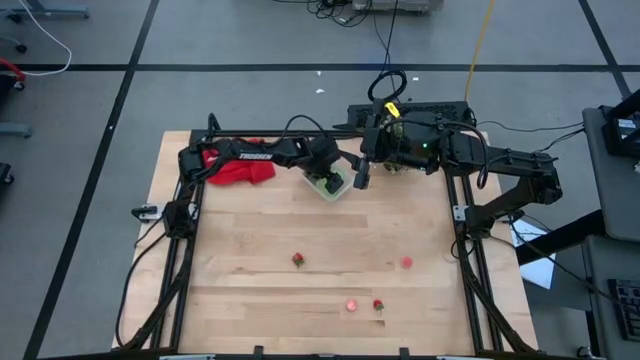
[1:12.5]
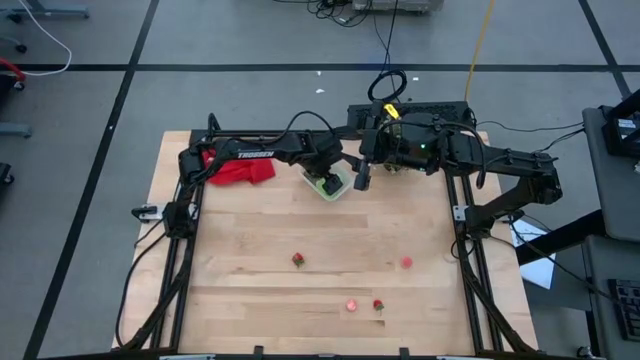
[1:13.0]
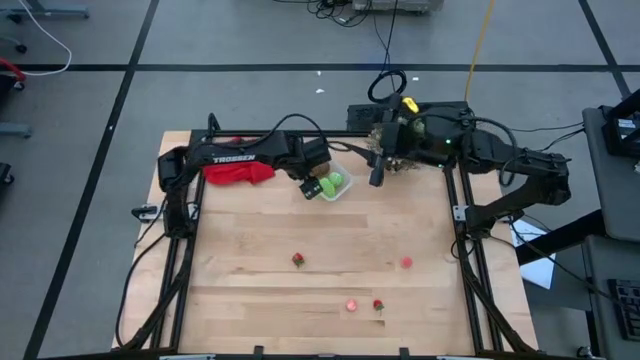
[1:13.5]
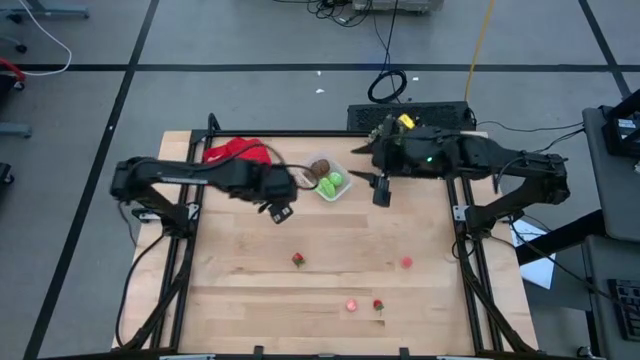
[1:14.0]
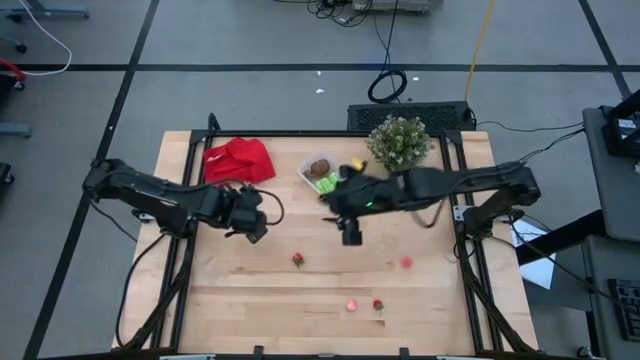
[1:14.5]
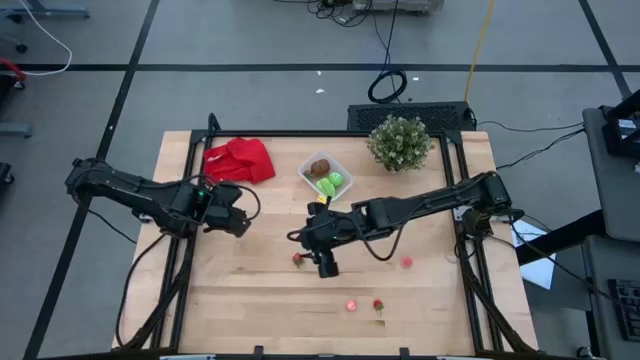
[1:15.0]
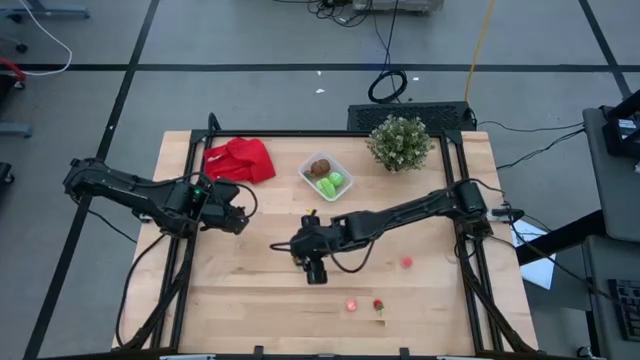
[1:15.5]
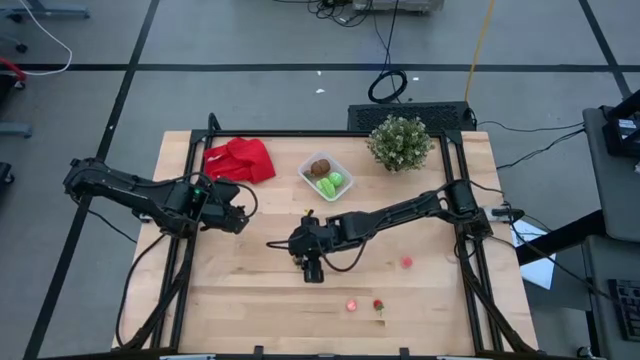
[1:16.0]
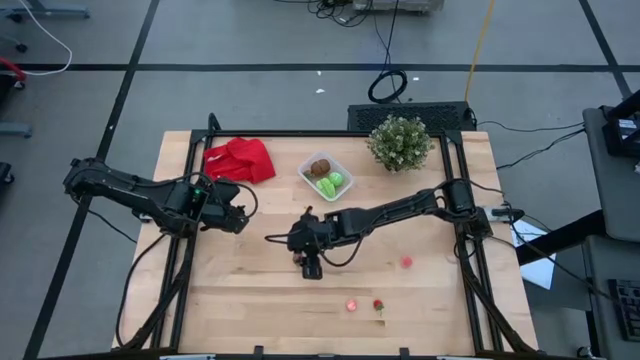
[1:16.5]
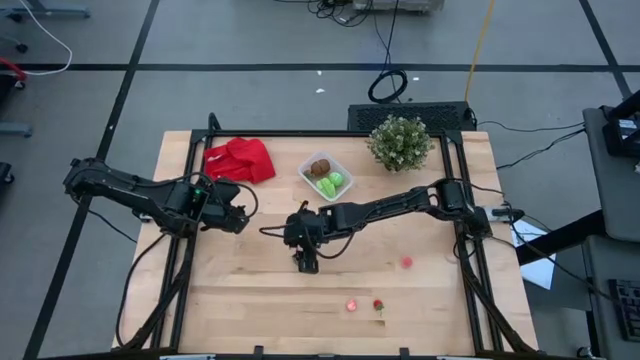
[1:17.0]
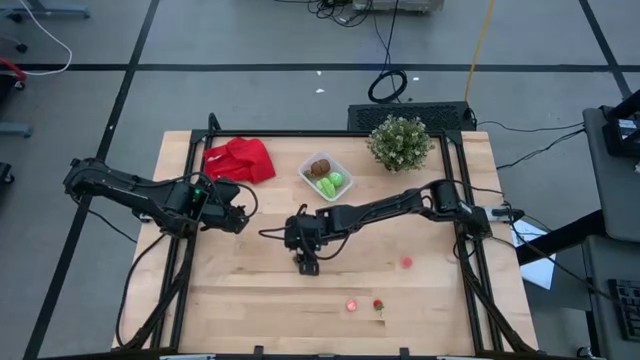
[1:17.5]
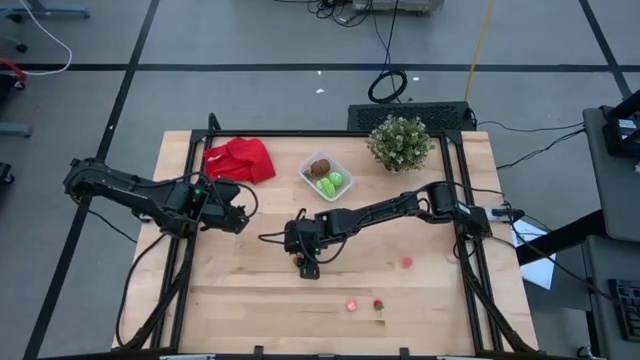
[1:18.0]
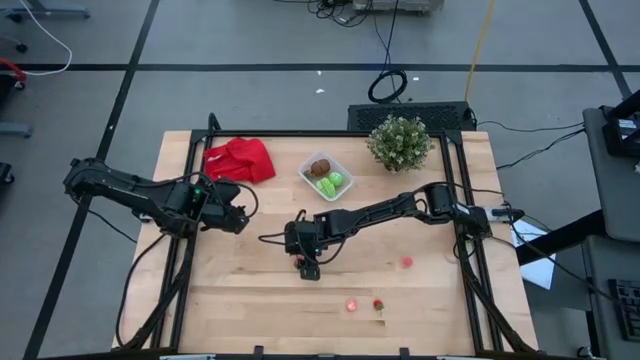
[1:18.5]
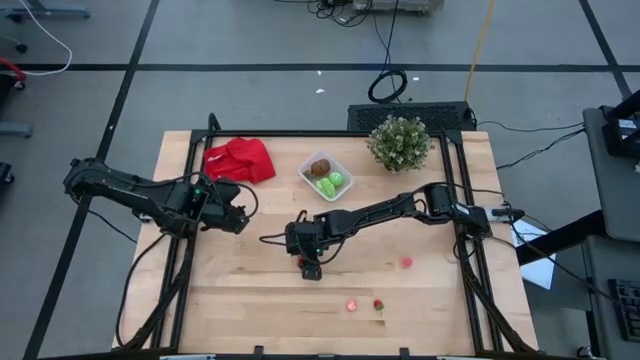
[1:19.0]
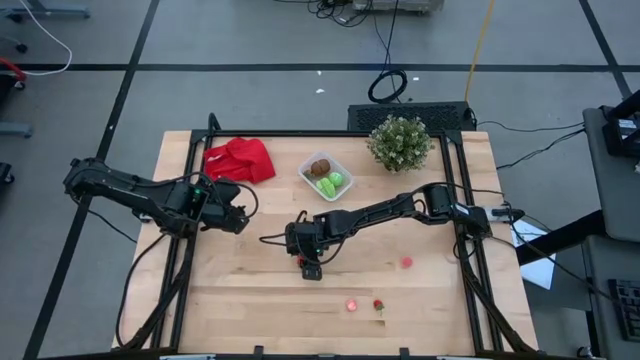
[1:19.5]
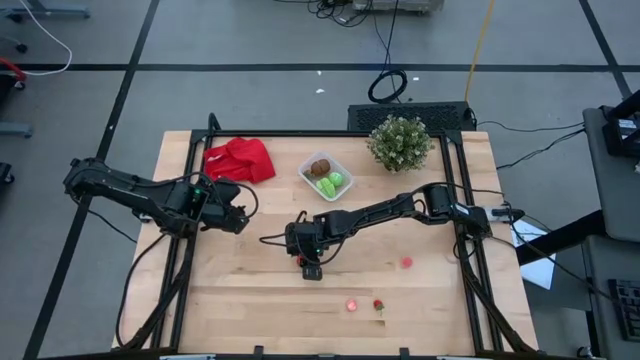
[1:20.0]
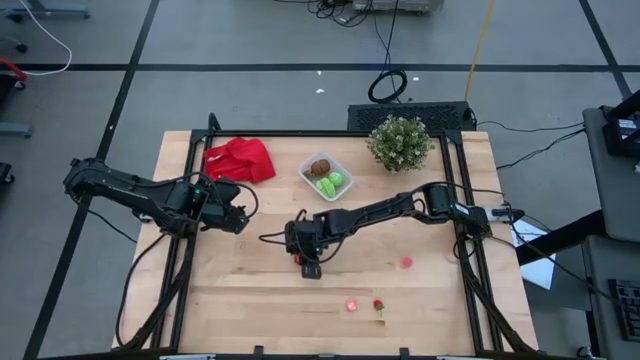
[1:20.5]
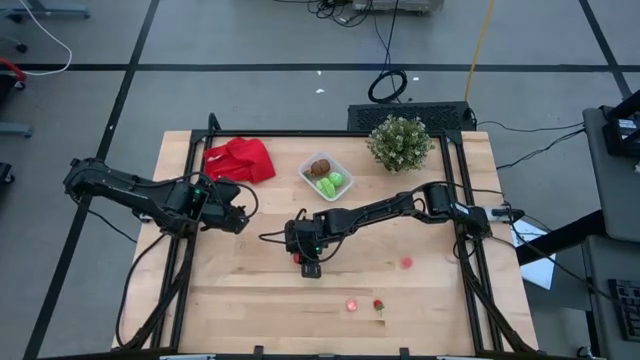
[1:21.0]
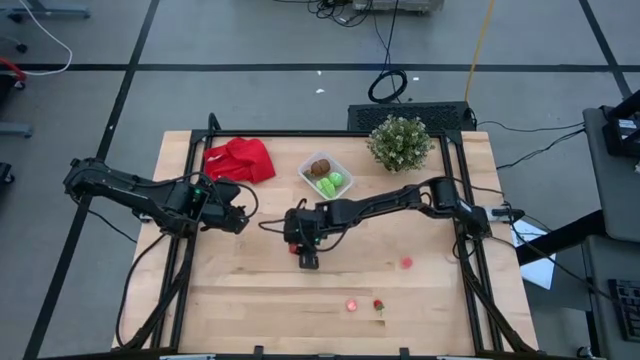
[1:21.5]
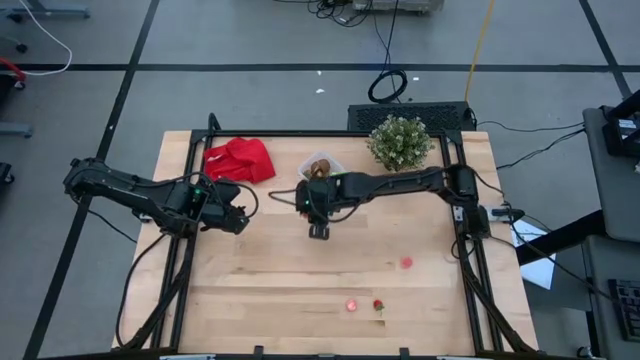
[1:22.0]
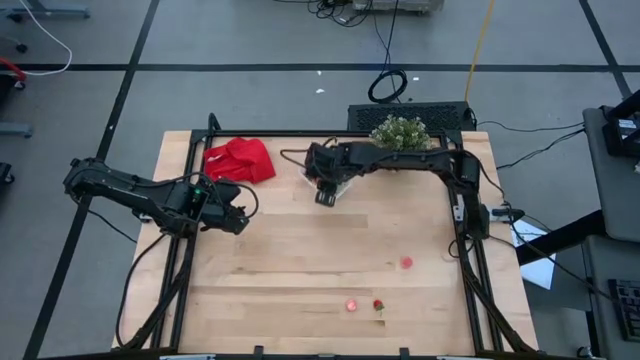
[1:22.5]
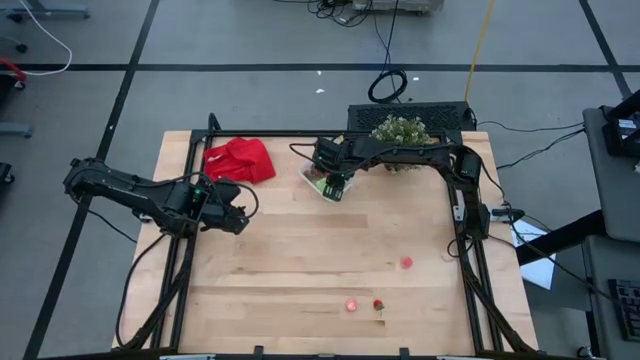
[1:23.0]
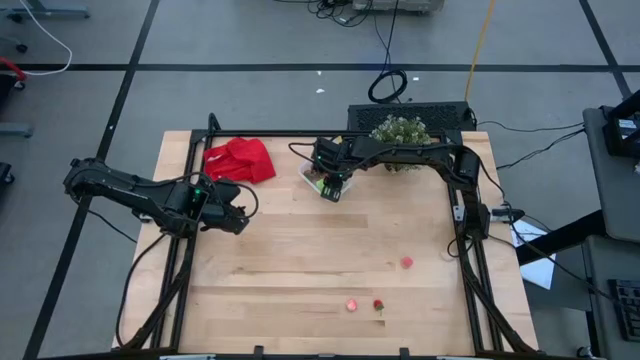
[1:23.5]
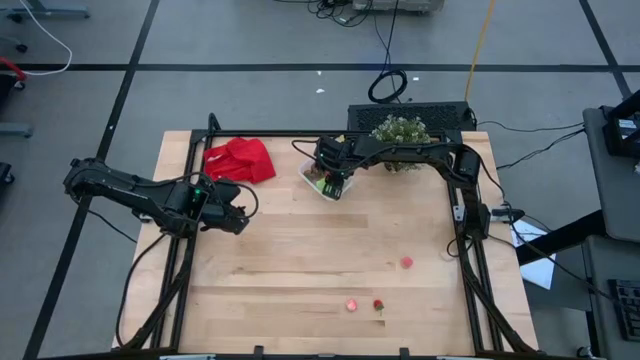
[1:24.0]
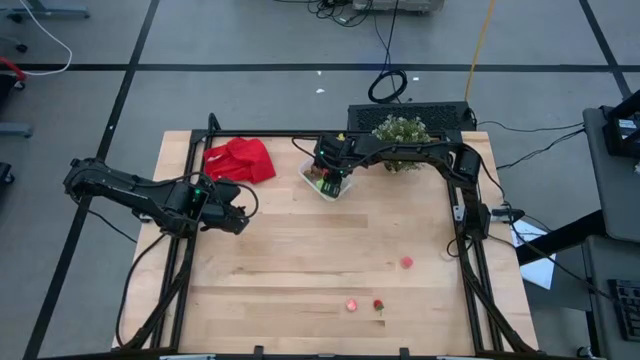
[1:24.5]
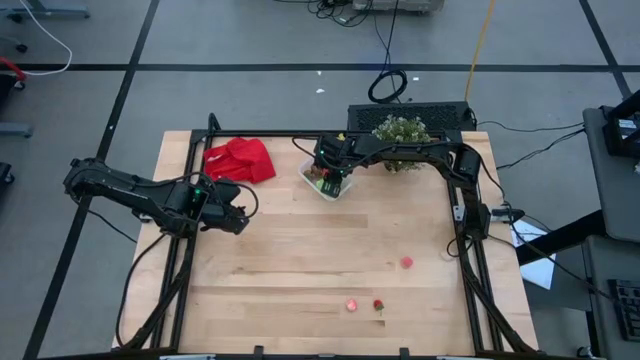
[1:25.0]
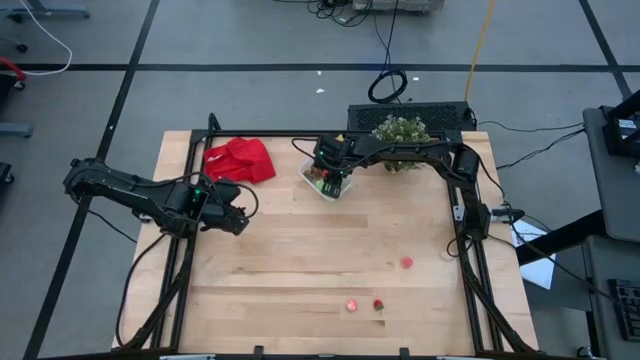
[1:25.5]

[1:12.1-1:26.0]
Task: Pick and placing Produce into tupperware
Put the left red strawberry into the transparent bin

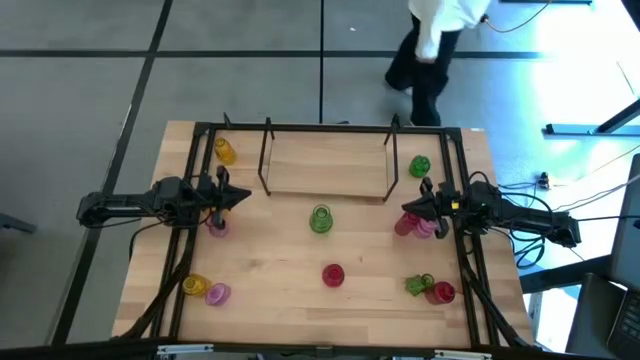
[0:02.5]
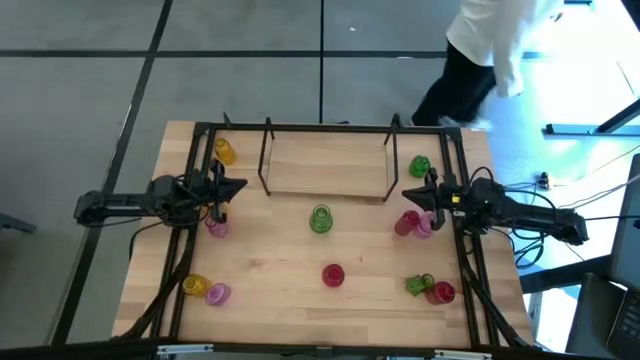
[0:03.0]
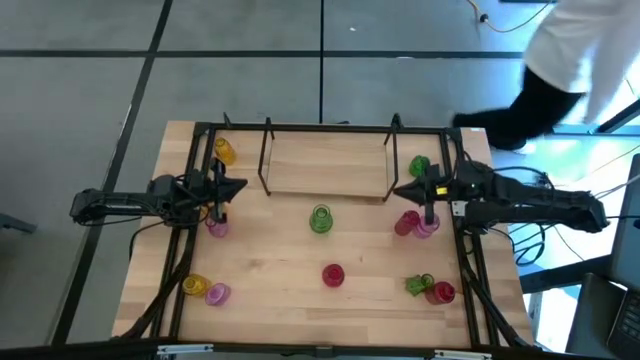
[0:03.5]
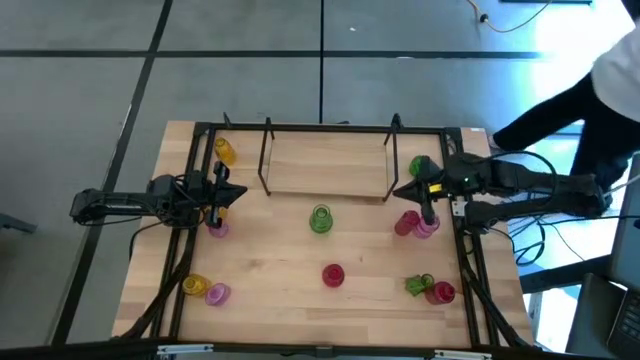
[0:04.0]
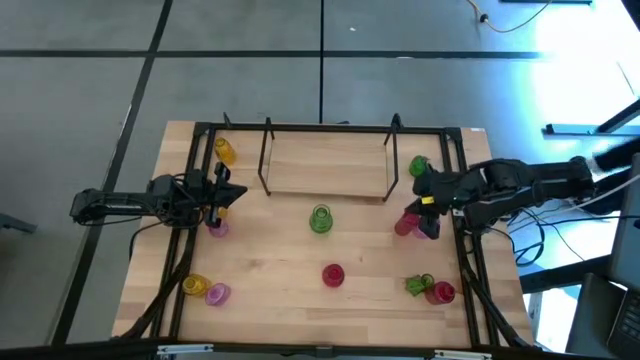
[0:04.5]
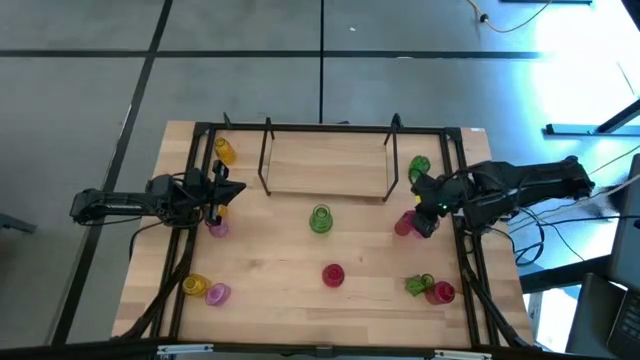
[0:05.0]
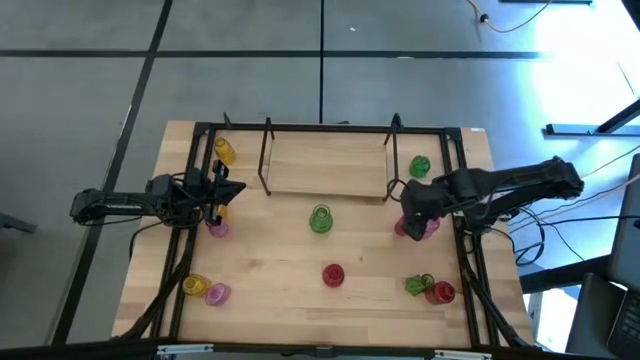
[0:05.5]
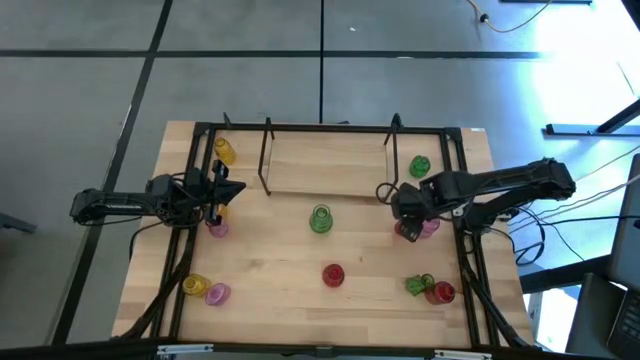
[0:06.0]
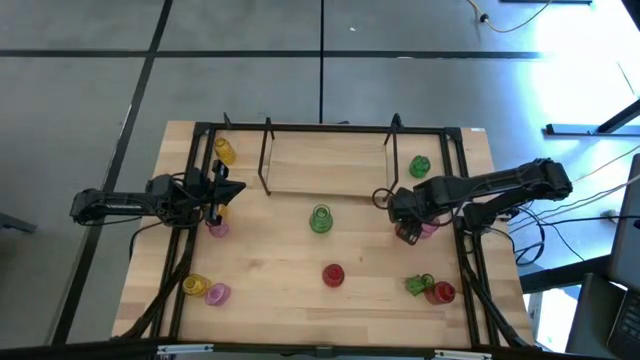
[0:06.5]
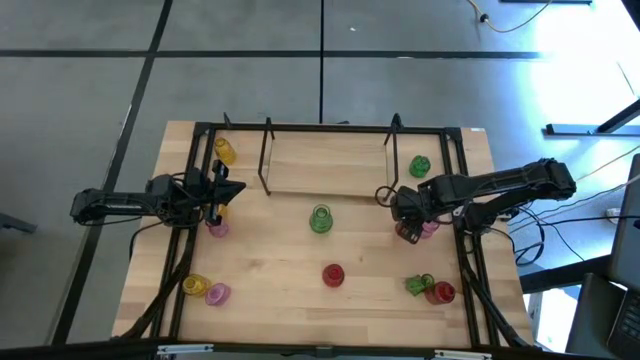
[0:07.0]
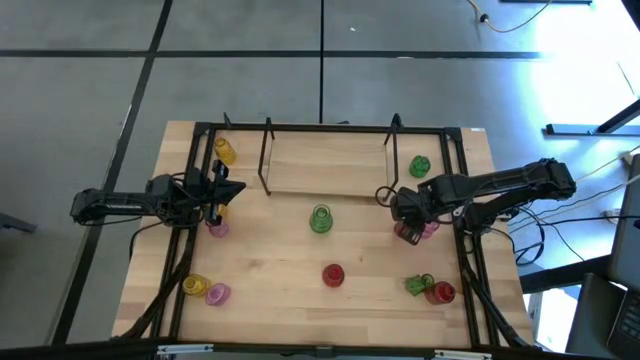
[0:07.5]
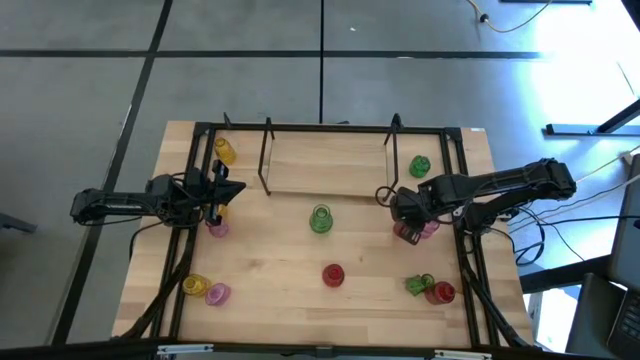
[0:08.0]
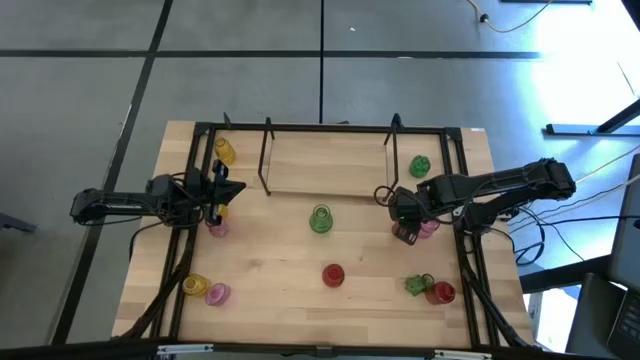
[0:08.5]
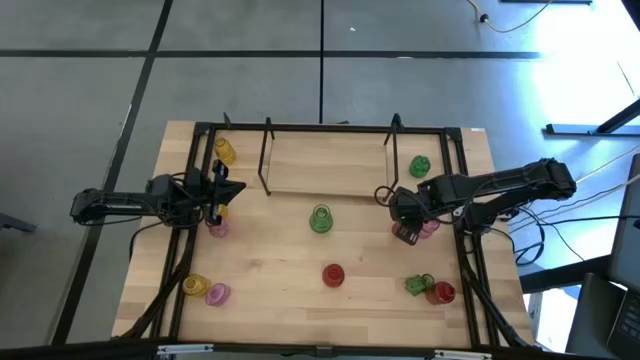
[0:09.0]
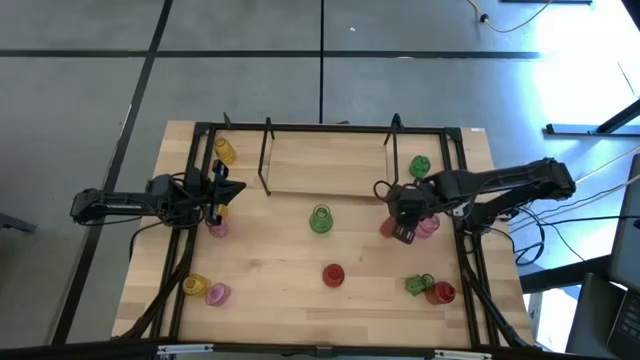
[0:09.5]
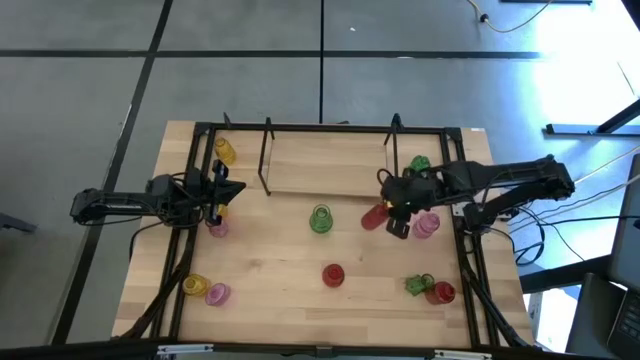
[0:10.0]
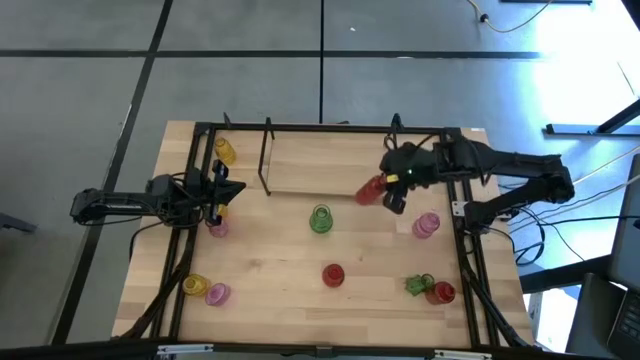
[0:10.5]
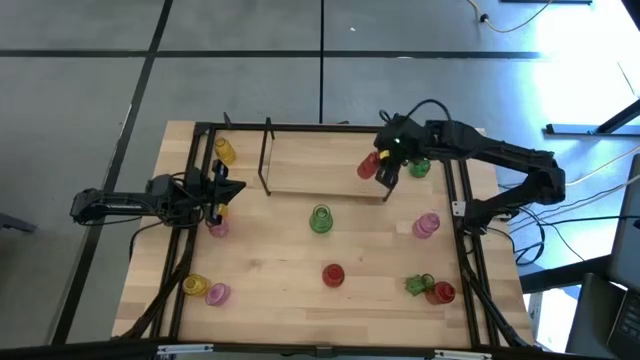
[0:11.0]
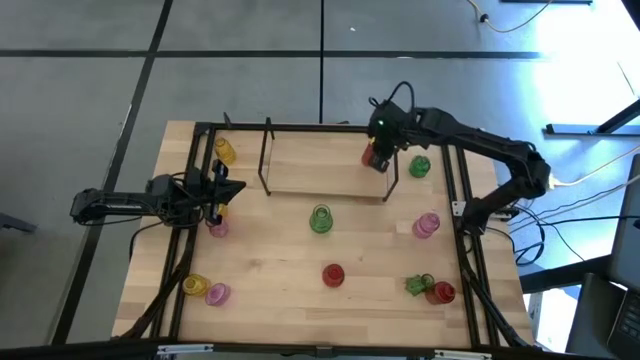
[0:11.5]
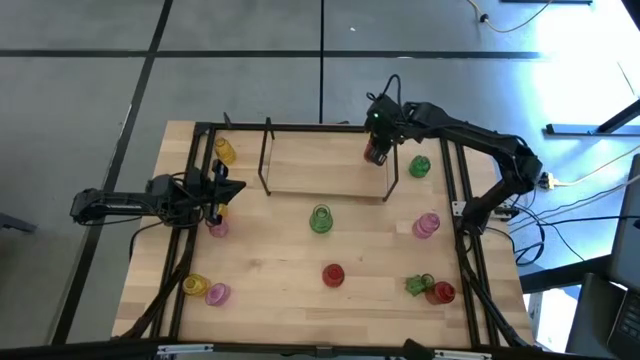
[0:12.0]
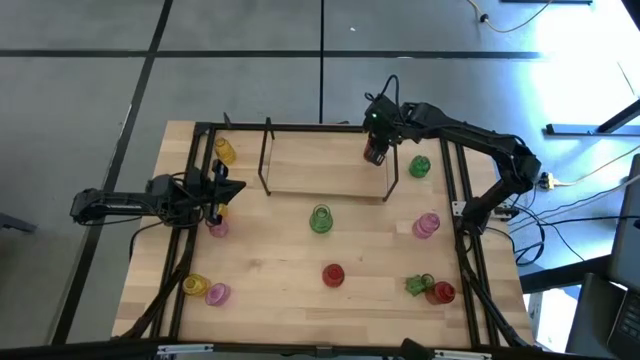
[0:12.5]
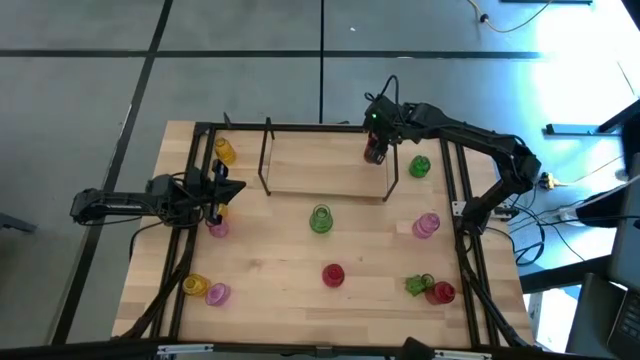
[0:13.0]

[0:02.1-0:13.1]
Task: sort vases onto shelf
Put the top red vase on the shelf
